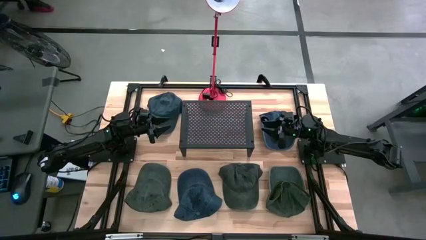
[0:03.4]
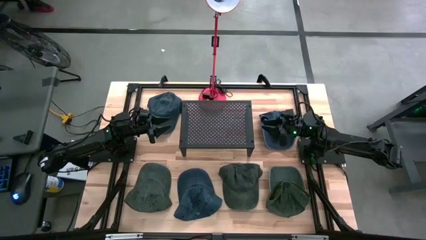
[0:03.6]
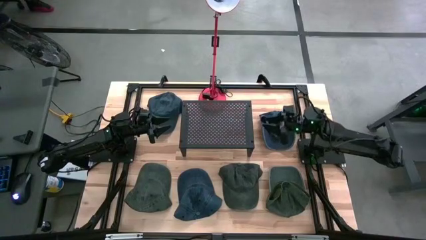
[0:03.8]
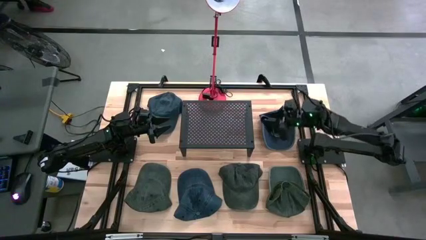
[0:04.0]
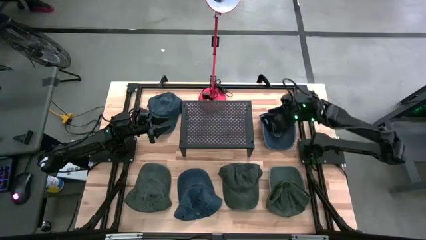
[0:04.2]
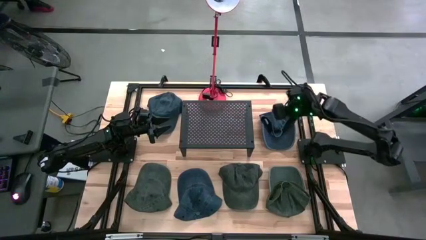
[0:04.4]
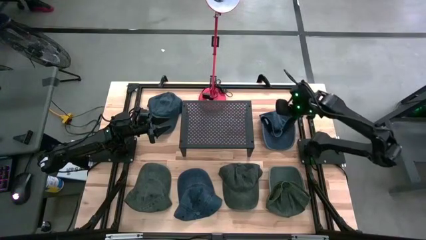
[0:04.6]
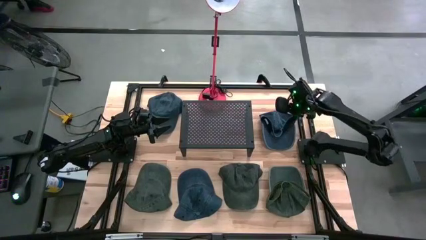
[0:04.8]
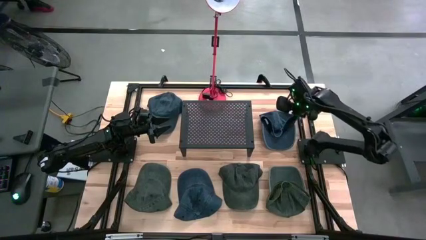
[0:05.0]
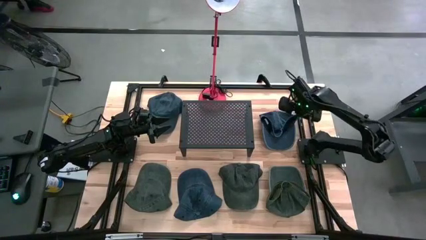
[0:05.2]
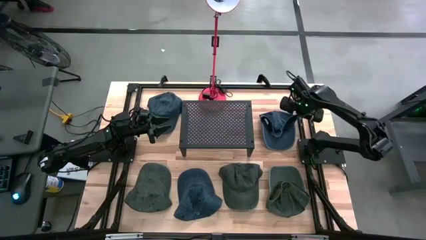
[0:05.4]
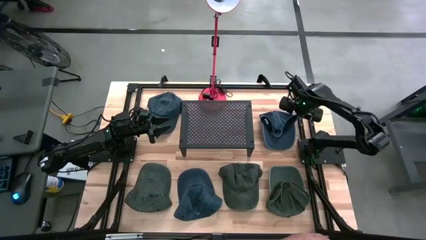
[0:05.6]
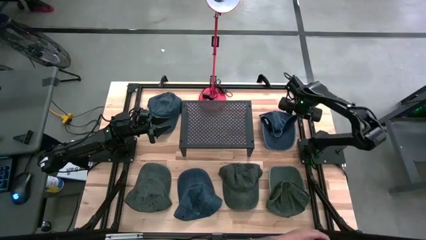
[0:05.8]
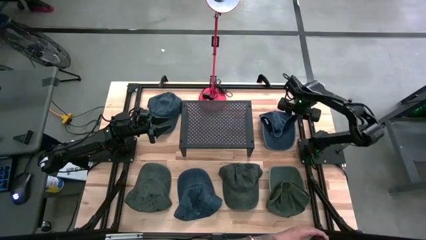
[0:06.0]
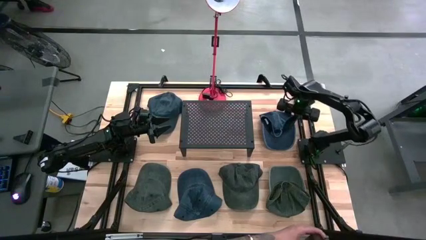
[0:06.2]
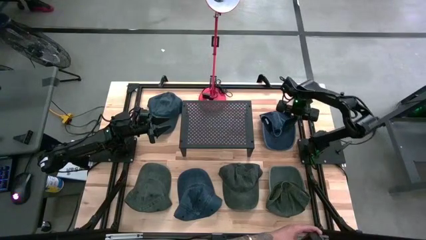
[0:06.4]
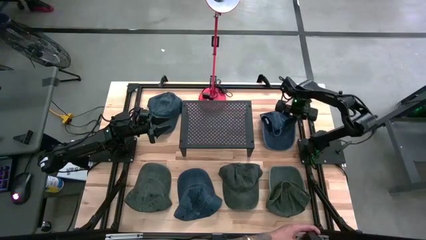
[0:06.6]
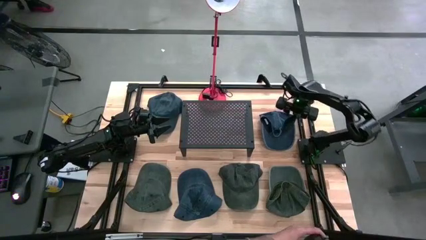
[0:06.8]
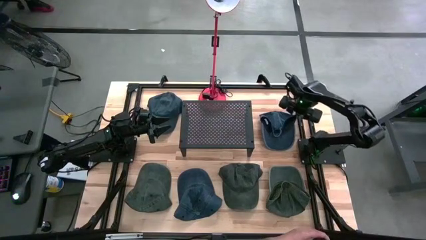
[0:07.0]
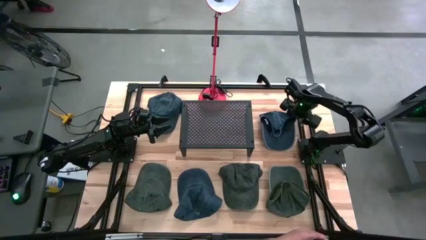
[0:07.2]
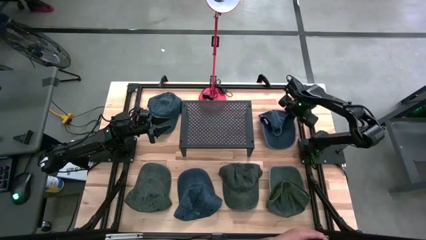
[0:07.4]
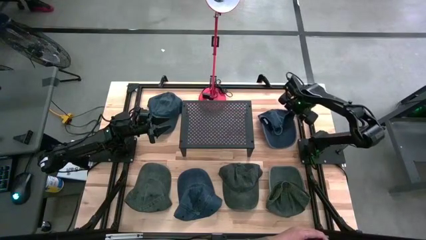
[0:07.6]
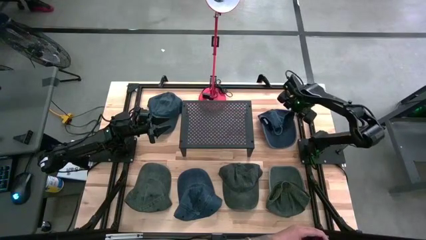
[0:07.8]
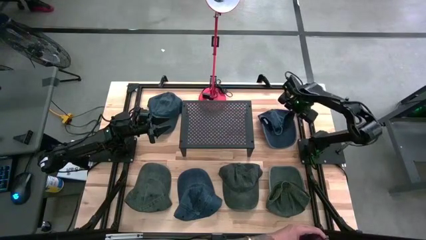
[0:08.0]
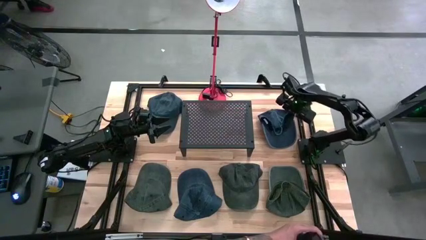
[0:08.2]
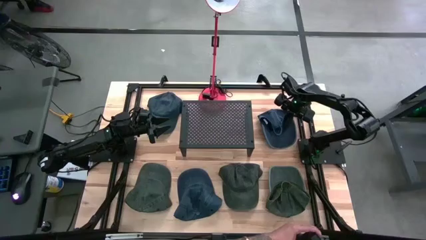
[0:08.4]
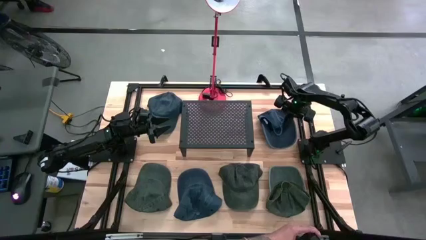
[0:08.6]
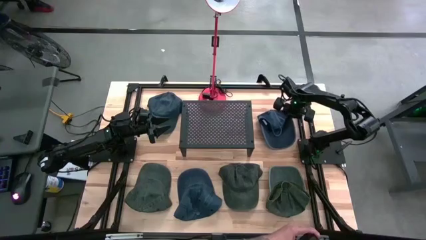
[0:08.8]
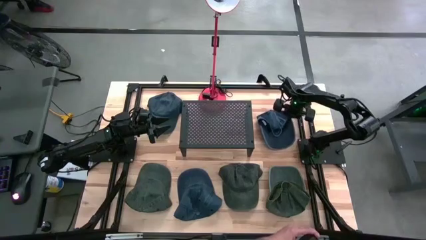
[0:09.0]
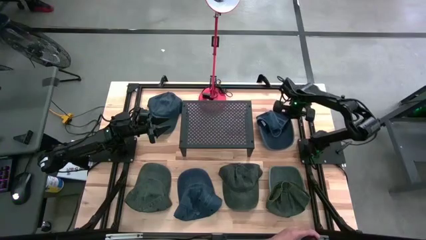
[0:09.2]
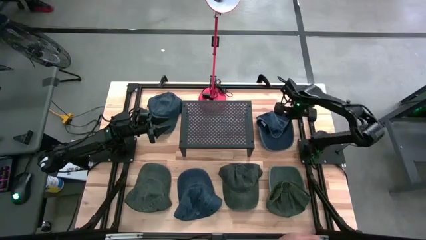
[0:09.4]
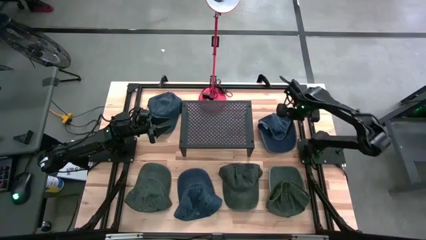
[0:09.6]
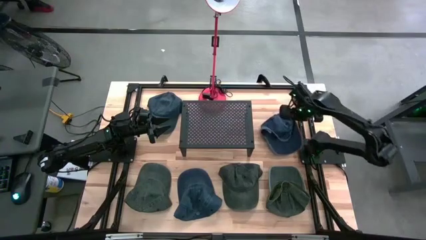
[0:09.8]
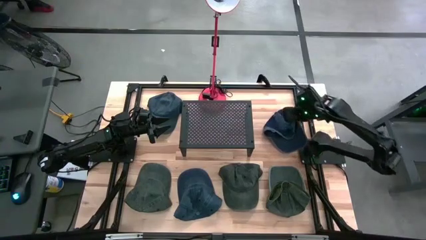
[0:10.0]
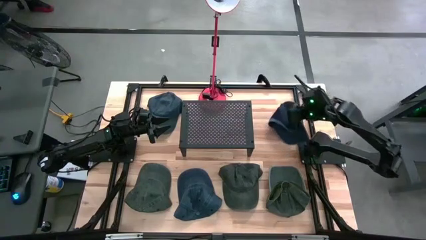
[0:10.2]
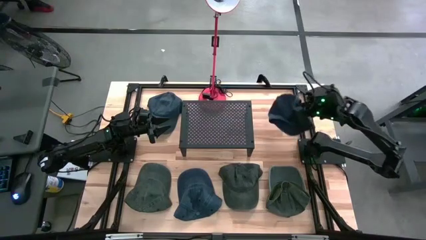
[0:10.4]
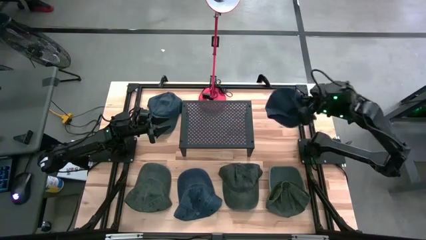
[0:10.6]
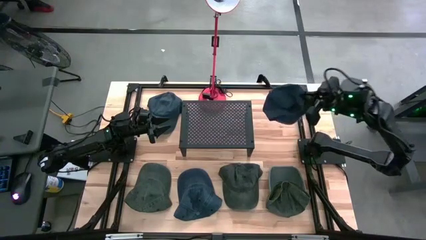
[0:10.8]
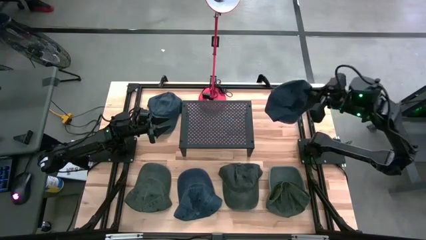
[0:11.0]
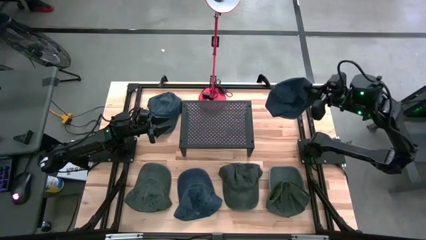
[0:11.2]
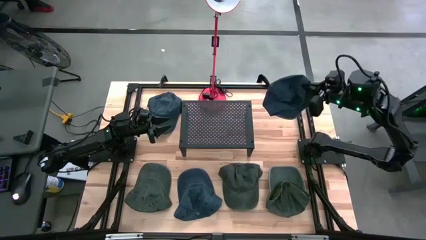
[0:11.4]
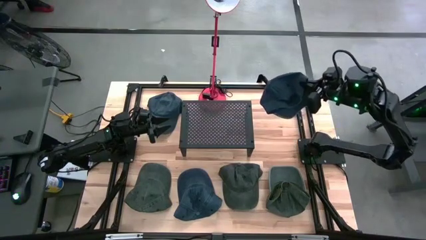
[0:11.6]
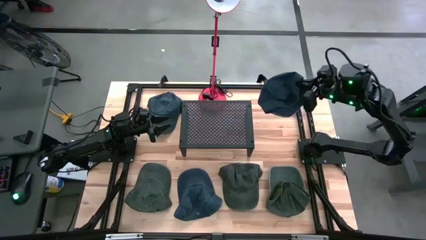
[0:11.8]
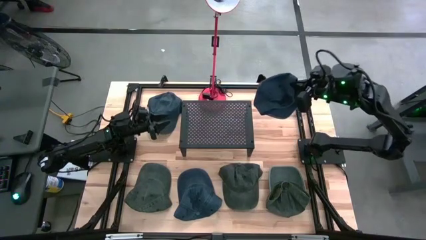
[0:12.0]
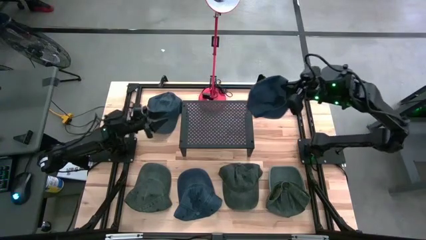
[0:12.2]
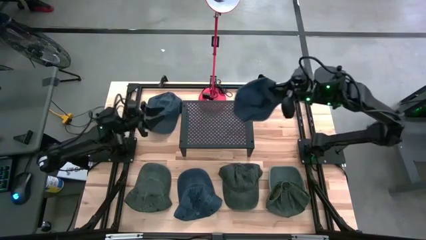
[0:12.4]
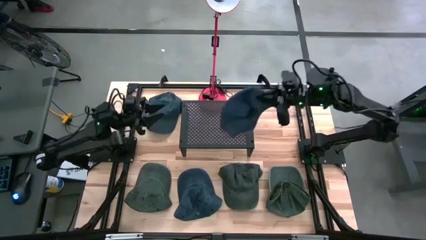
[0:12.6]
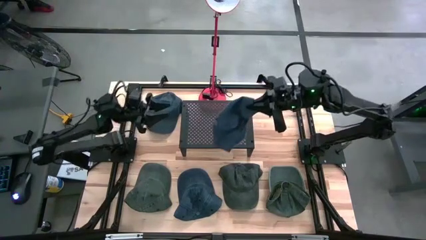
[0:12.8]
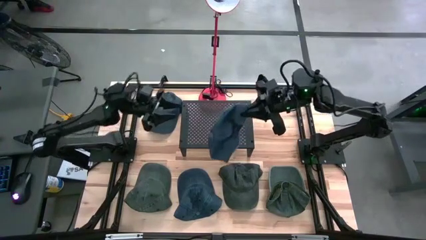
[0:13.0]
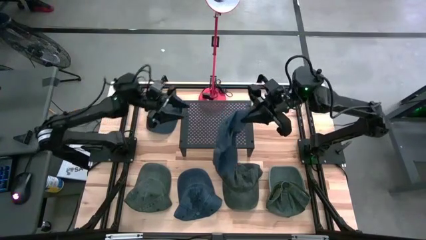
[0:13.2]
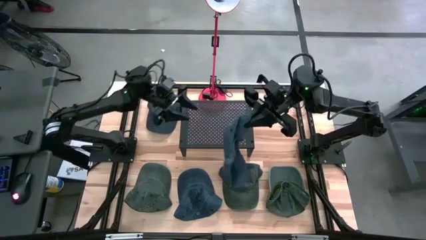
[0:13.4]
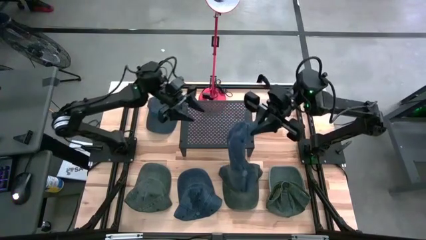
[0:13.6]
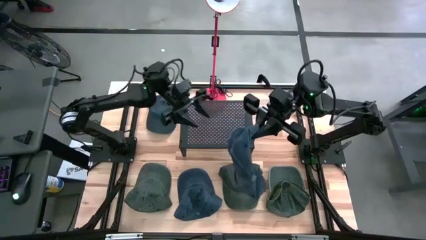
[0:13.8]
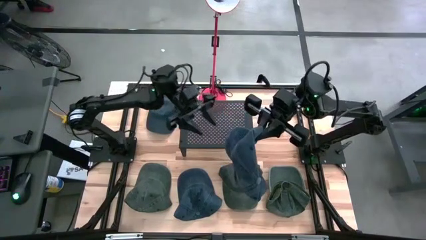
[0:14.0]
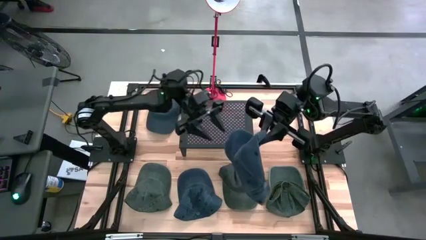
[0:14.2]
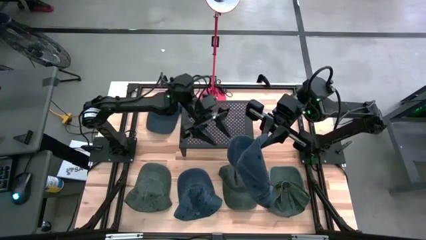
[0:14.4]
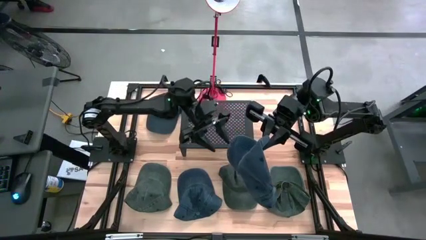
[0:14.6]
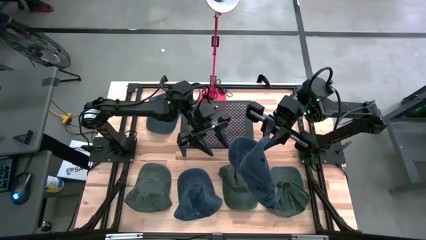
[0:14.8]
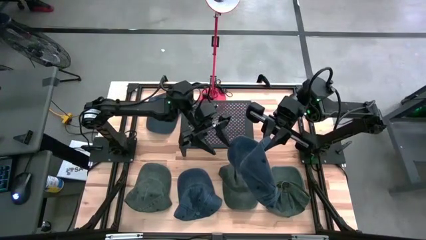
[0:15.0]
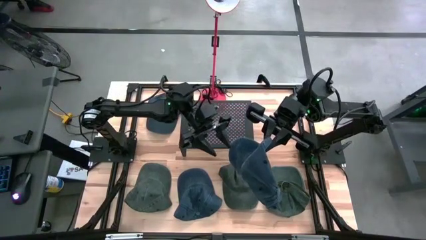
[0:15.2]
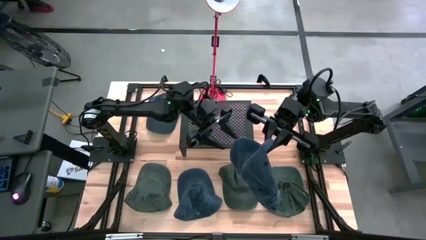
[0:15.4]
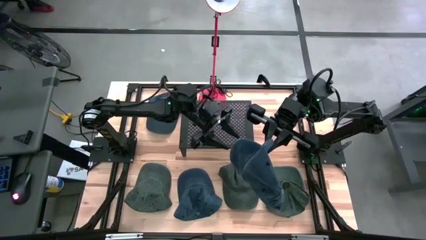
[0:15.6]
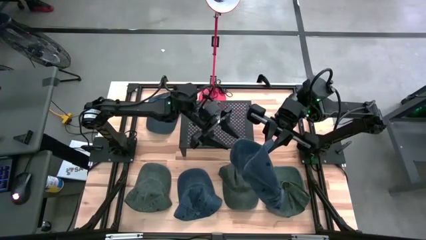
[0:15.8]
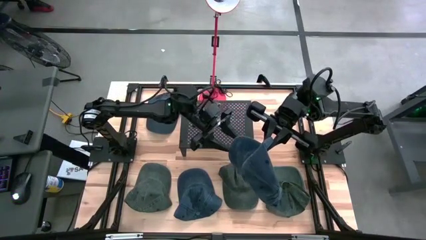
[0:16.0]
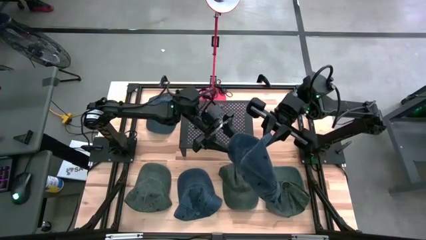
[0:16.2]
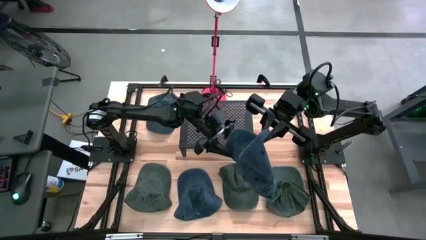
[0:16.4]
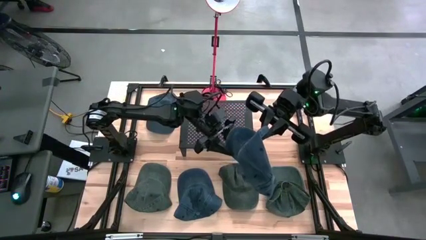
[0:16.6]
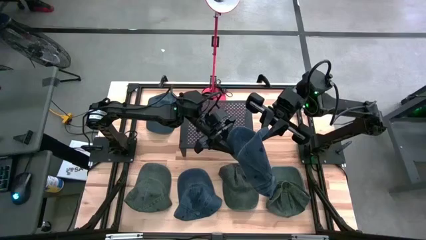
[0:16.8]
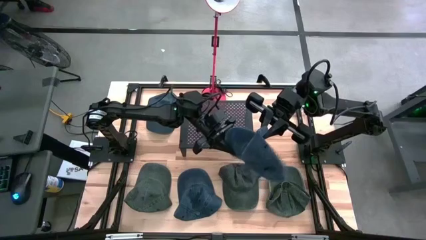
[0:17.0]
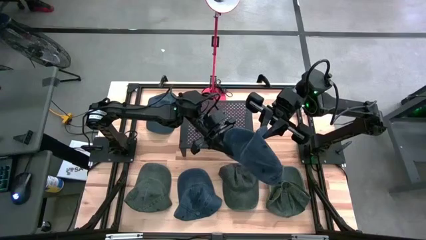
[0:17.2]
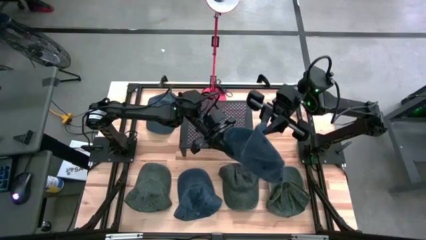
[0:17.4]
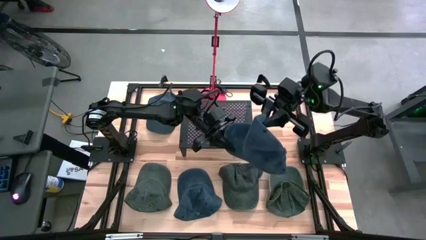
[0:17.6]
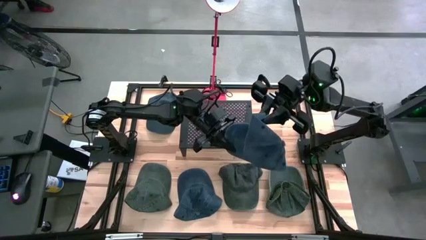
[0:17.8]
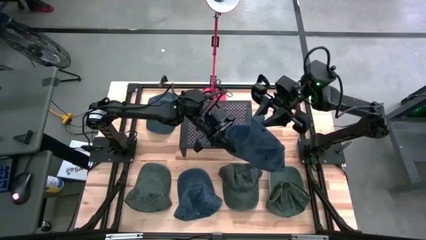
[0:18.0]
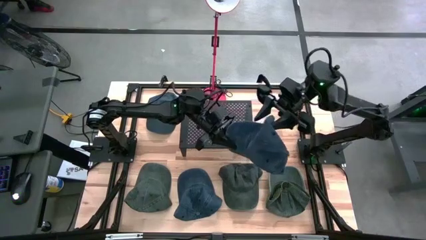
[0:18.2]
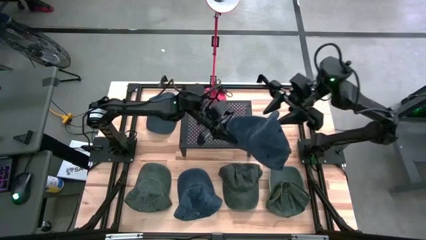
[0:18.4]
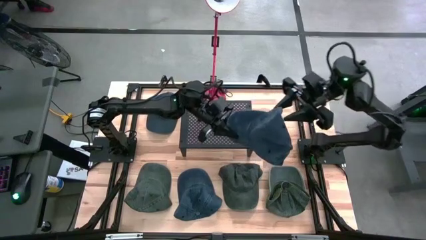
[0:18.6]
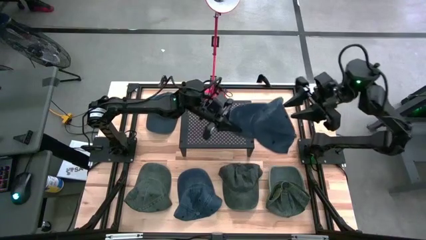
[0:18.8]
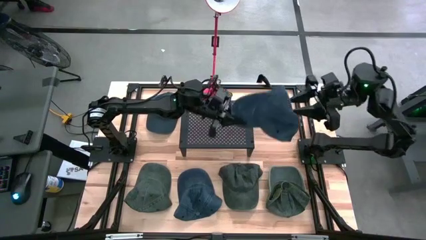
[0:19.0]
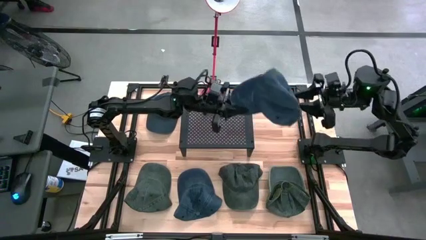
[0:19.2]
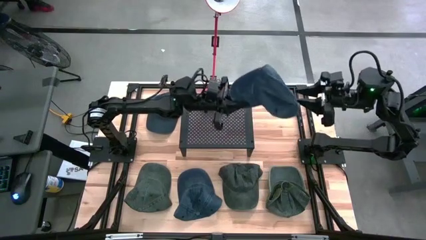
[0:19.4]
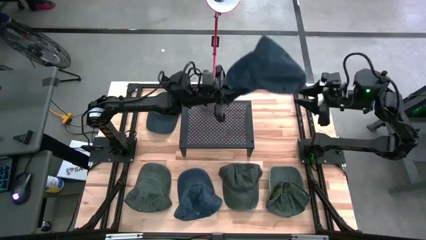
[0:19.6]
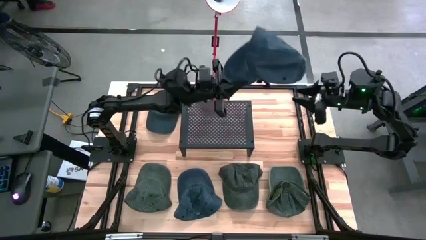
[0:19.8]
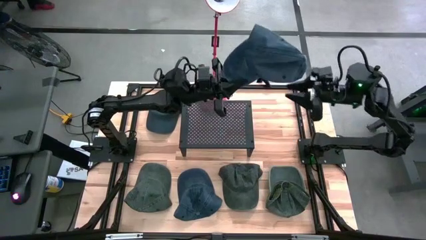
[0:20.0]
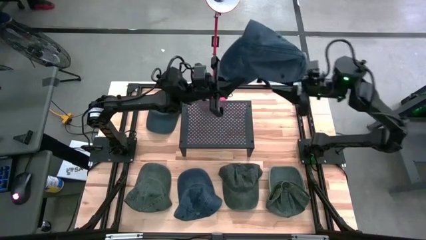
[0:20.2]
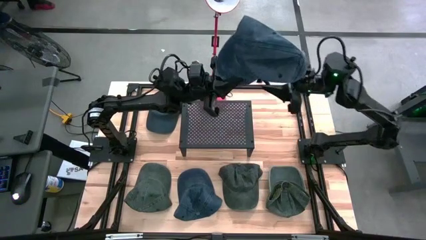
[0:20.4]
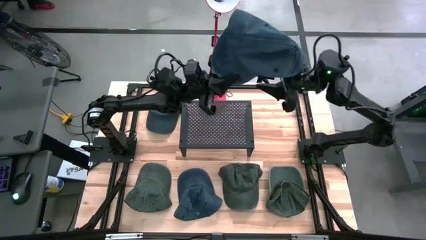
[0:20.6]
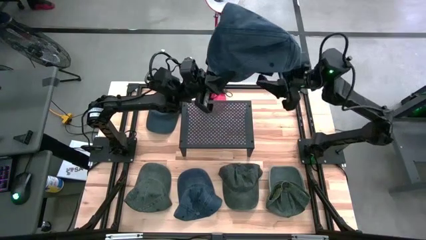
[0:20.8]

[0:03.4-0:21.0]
Task: Pick & Place hat
Put the top right blue cap on the shelf
